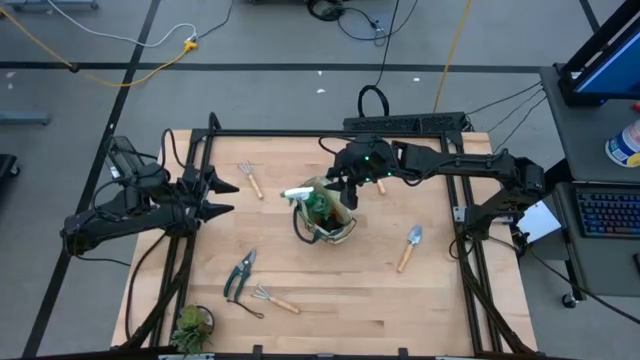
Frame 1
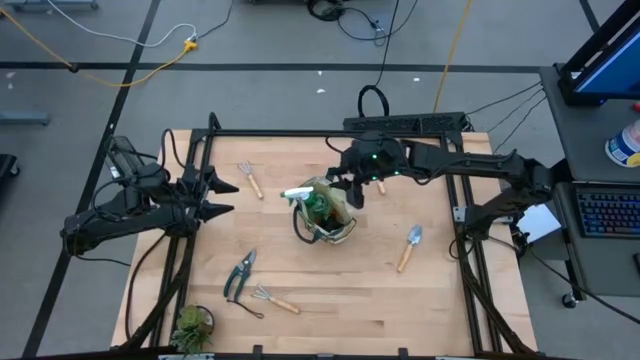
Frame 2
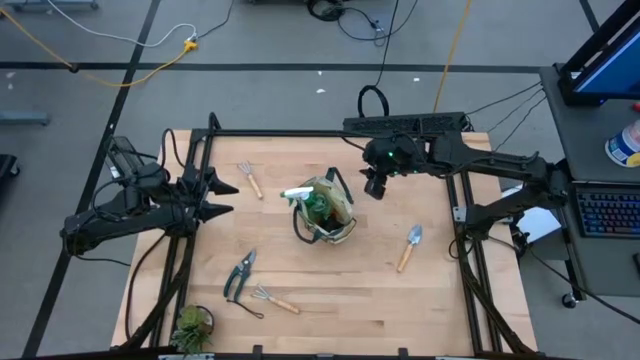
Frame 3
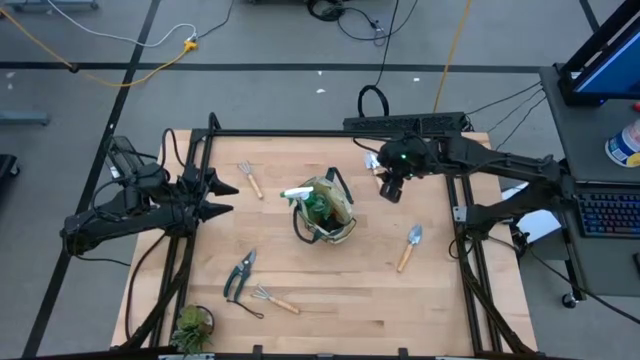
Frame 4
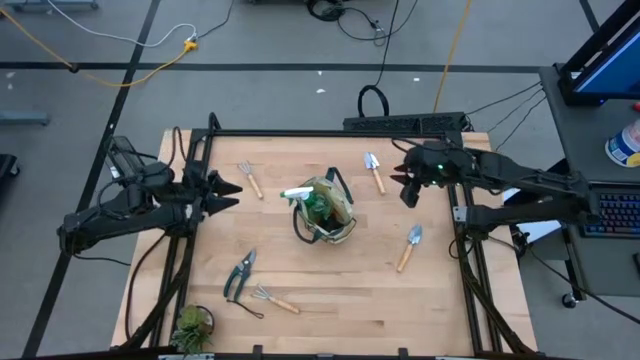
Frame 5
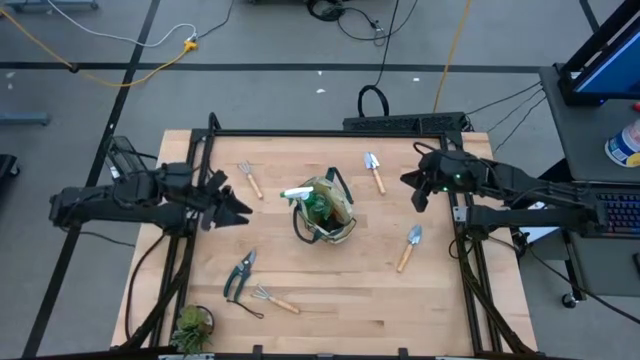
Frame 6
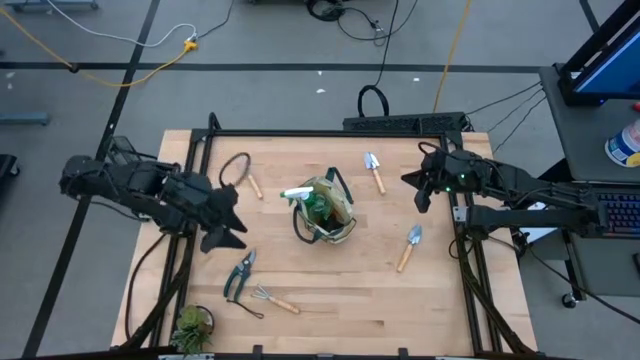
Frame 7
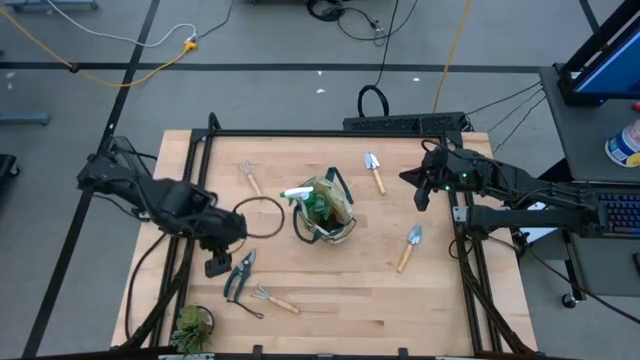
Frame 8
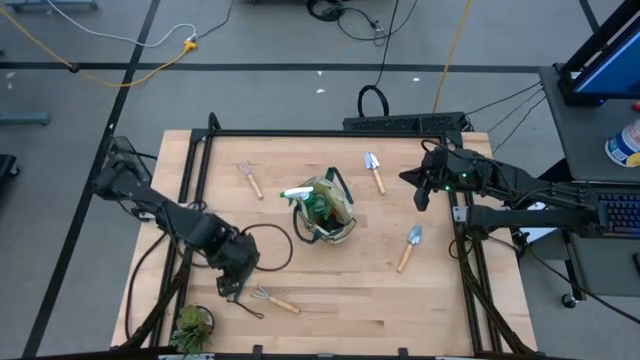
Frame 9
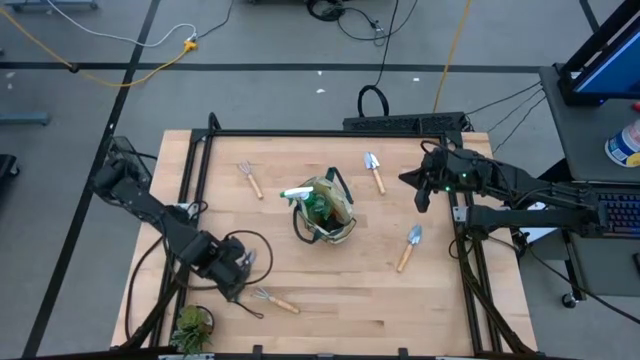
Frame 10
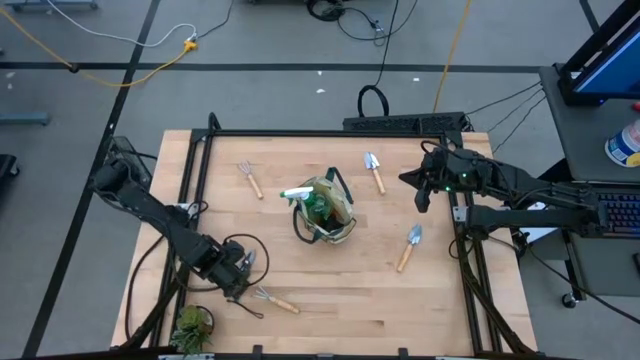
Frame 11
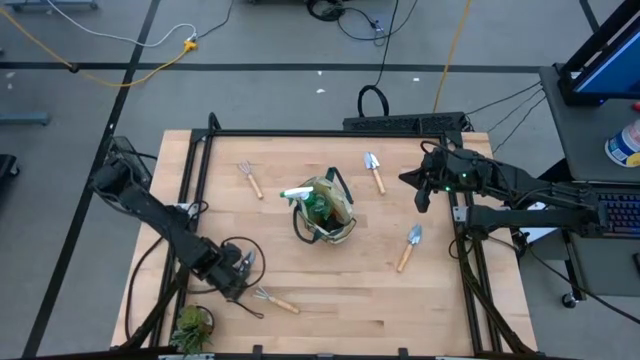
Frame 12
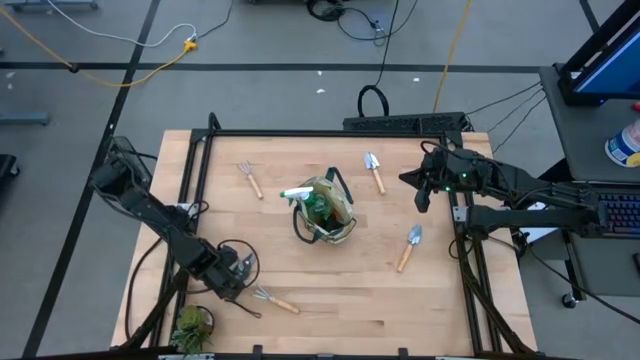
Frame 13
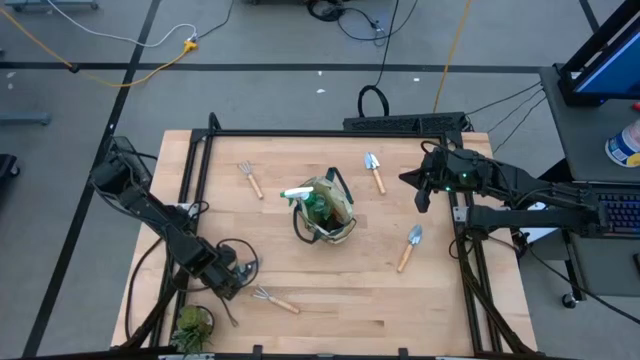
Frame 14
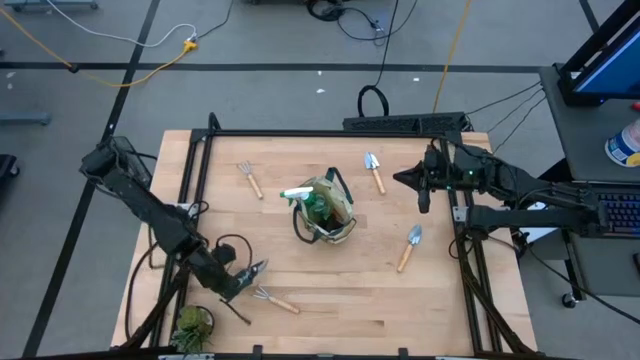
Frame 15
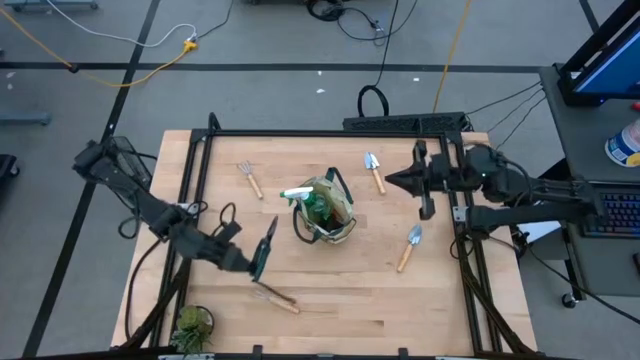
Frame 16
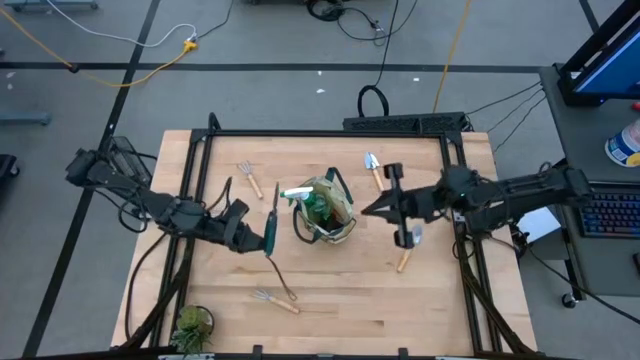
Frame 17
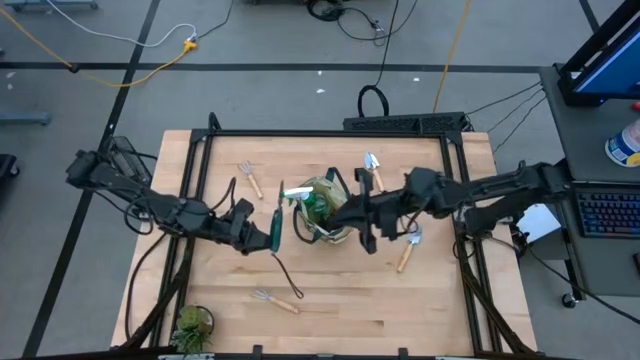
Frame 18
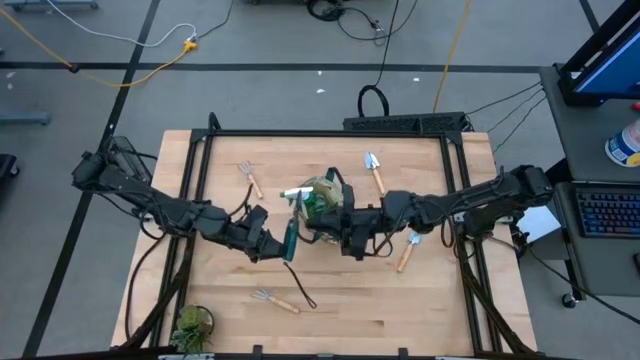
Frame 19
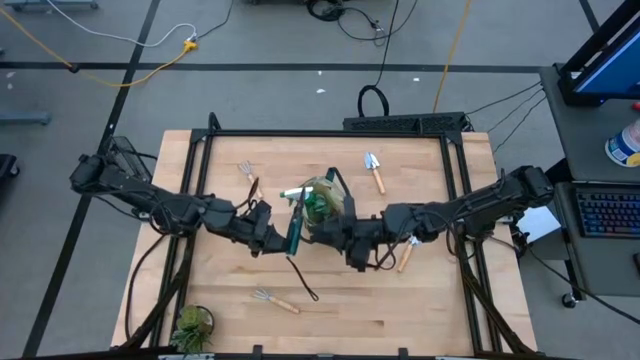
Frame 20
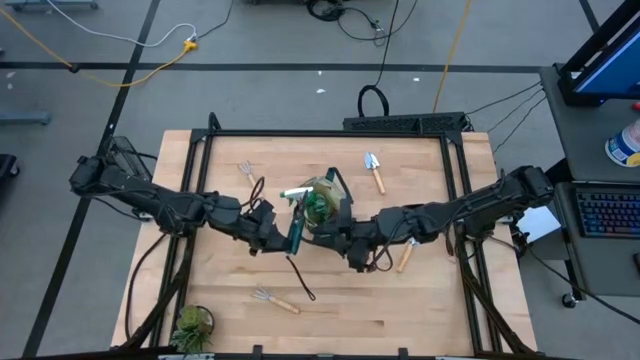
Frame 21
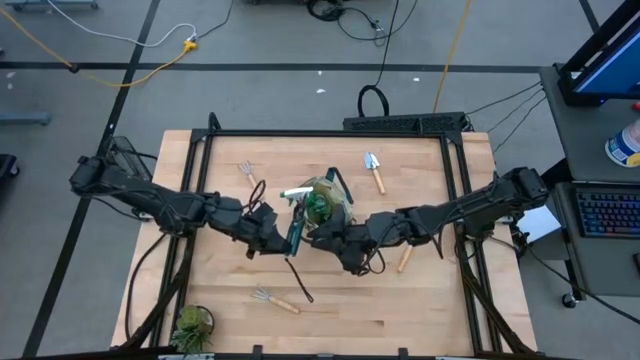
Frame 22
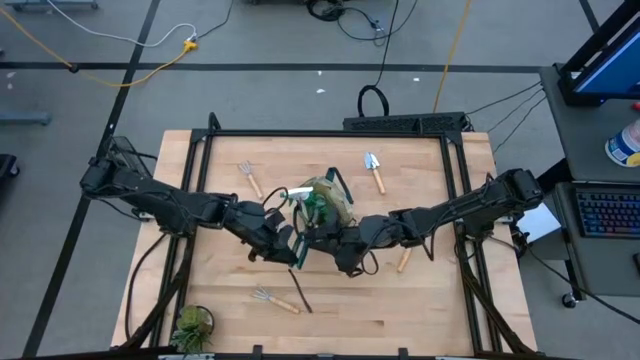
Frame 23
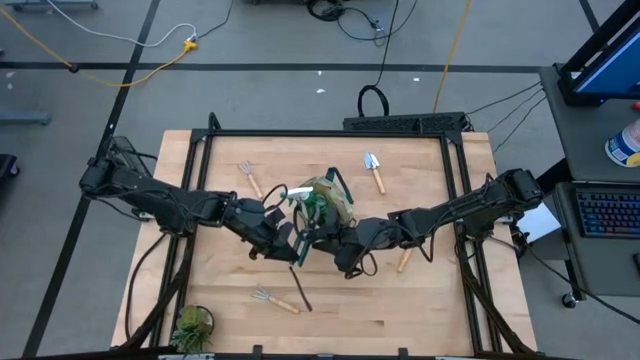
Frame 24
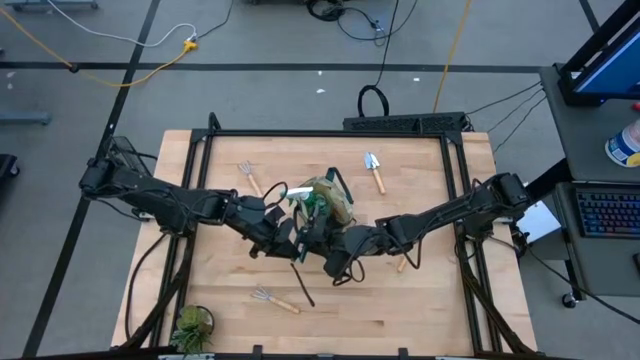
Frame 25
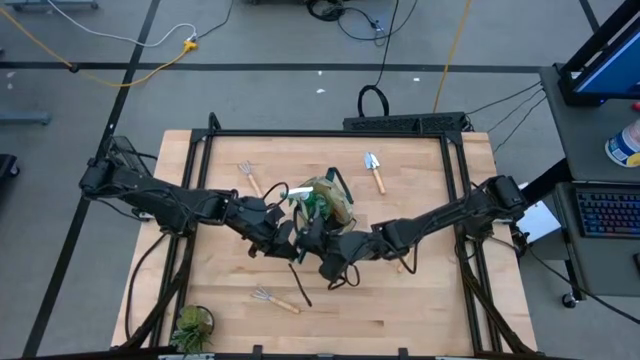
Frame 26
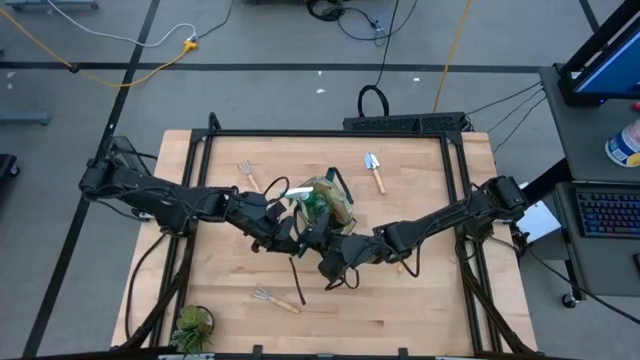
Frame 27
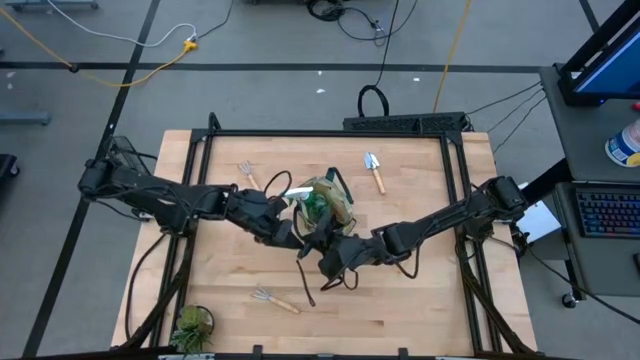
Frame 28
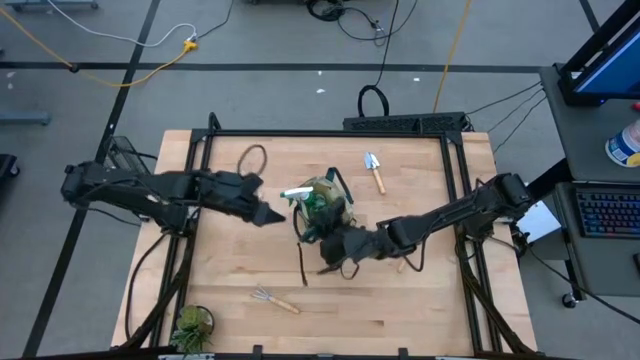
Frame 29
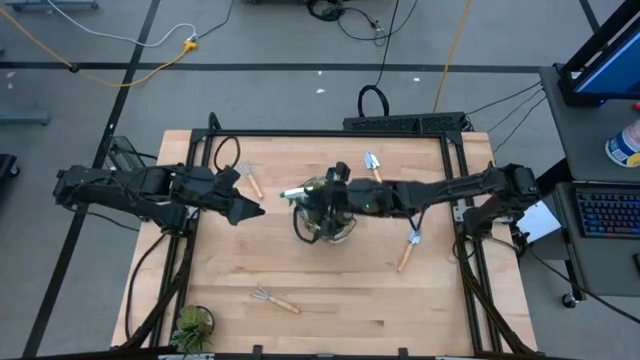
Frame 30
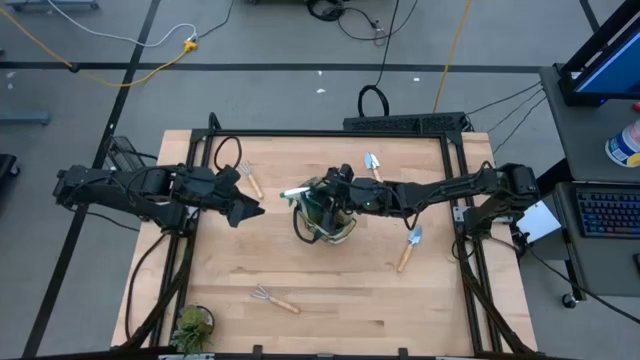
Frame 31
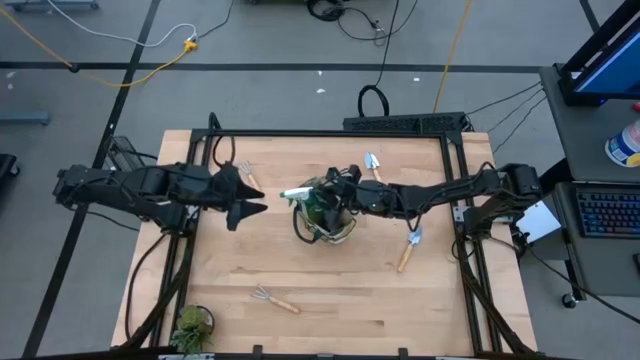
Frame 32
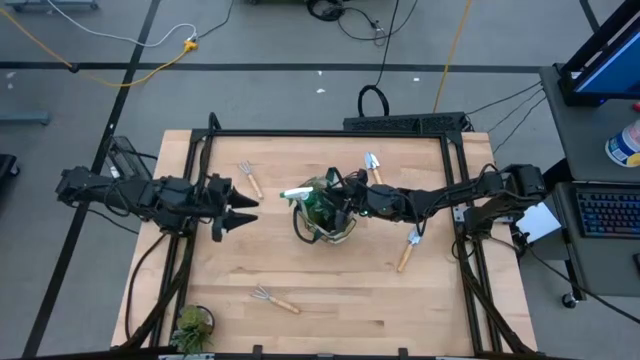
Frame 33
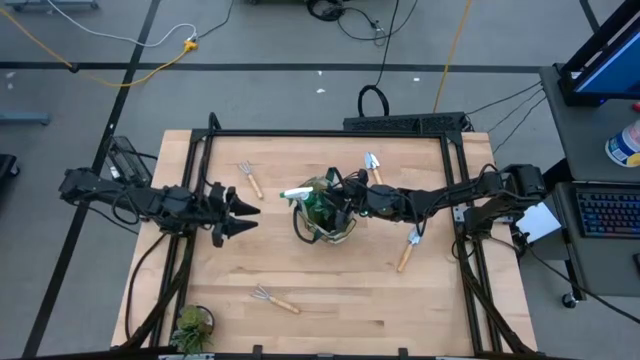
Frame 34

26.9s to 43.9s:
Task: Pick & Place Garden tools in Gardening bag
Put the shear scissors into the gardening bag

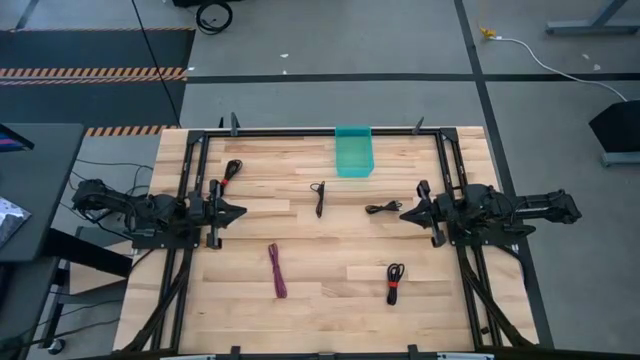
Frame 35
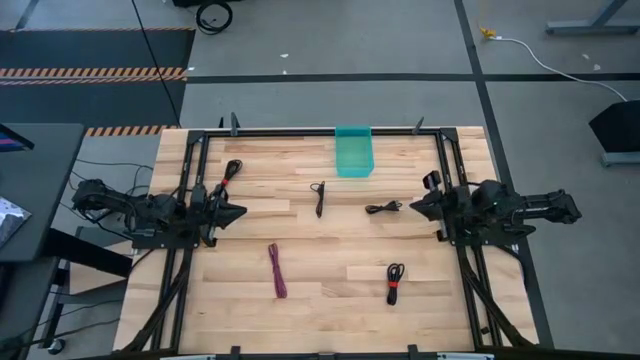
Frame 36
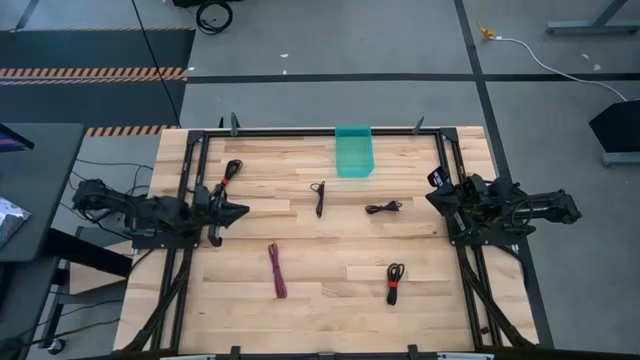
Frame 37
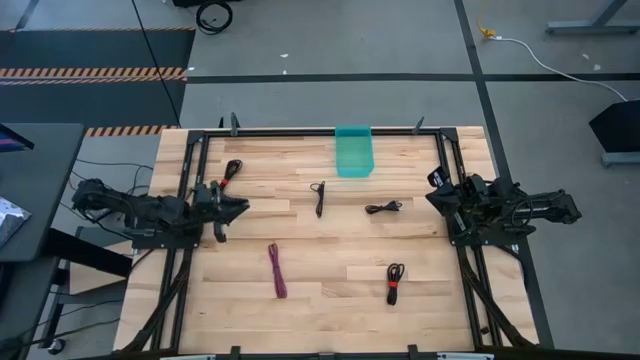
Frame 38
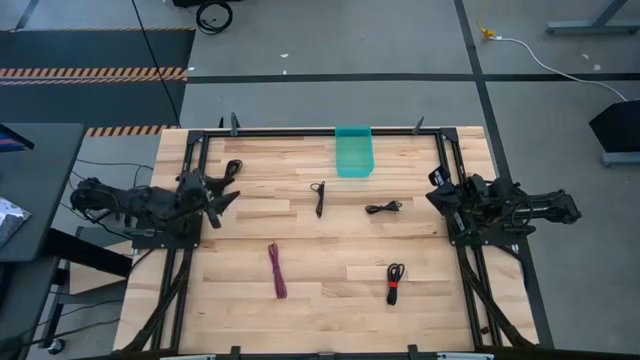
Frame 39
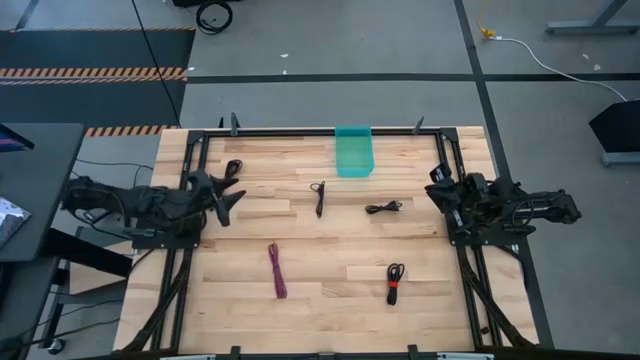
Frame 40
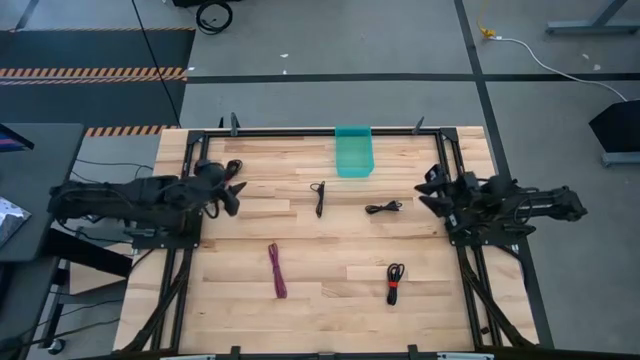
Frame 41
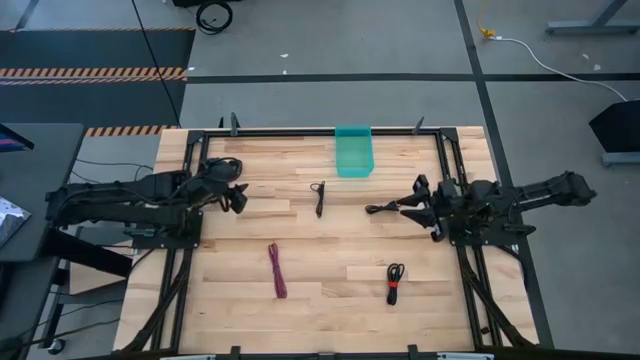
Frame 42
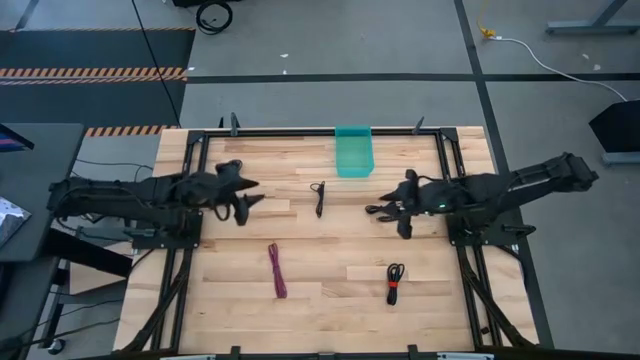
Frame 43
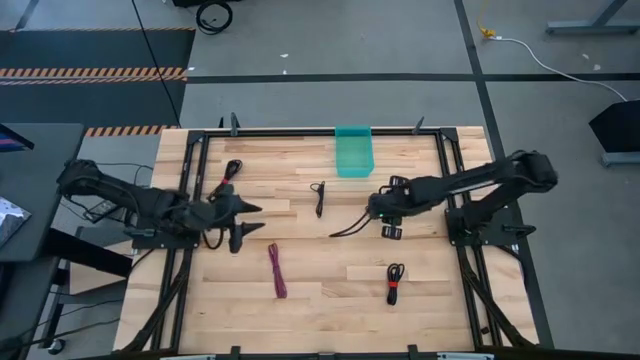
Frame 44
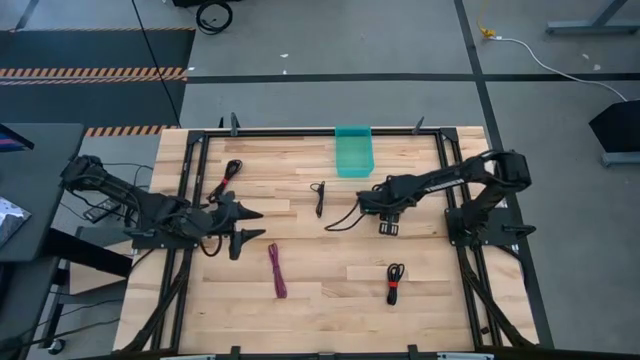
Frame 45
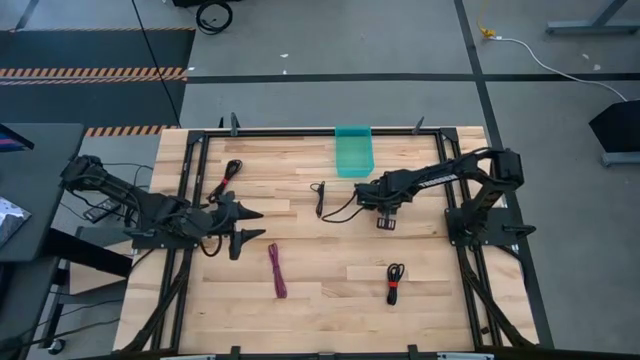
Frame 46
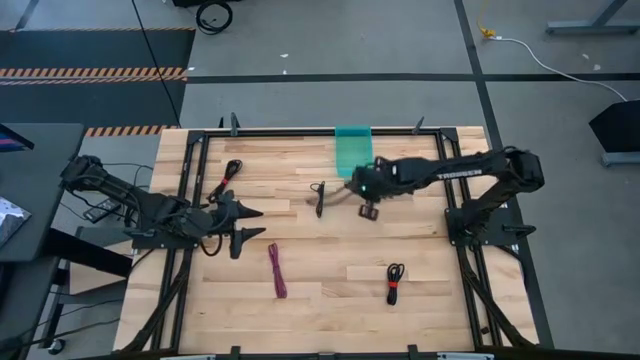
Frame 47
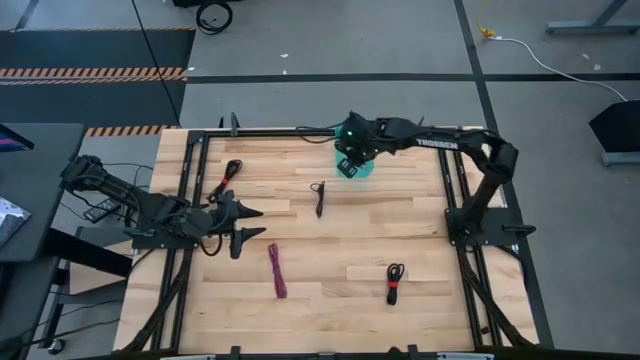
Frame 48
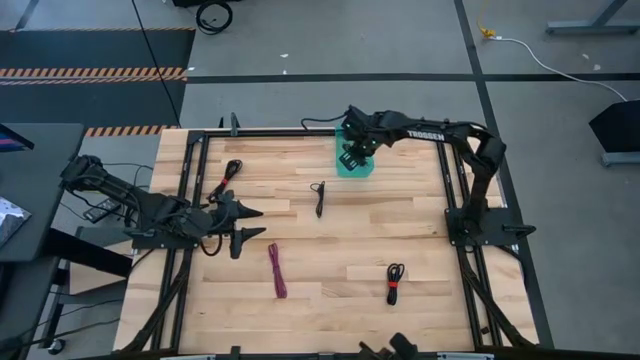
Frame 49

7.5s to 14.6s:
Task: Pick and place USB-C Cables
Put the black charger cable into the green bin
